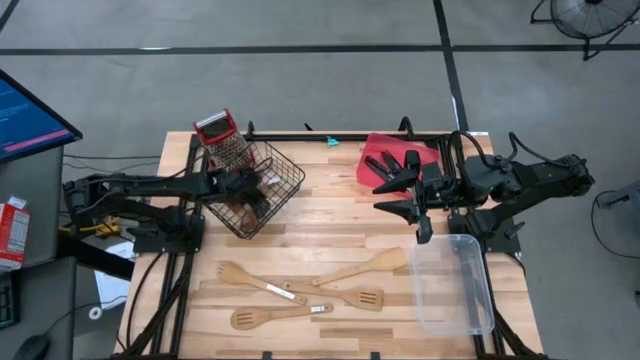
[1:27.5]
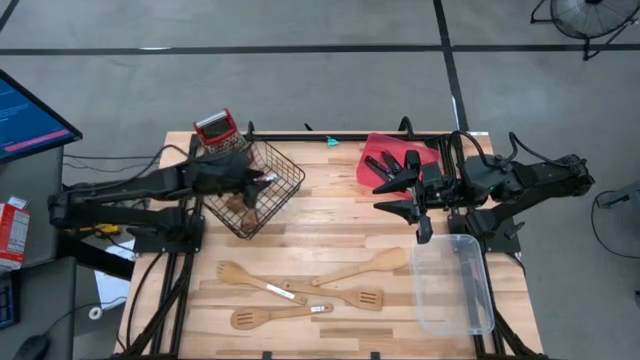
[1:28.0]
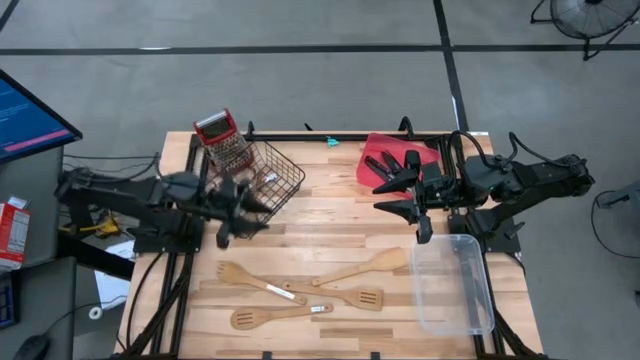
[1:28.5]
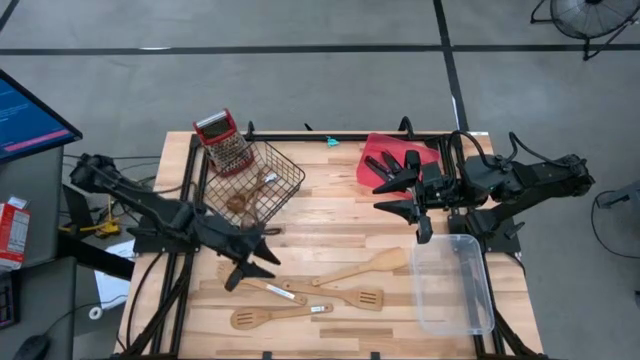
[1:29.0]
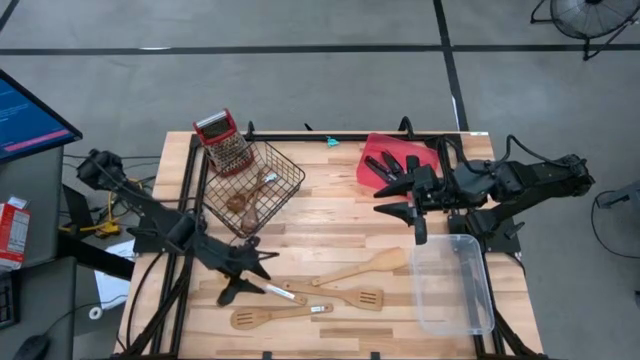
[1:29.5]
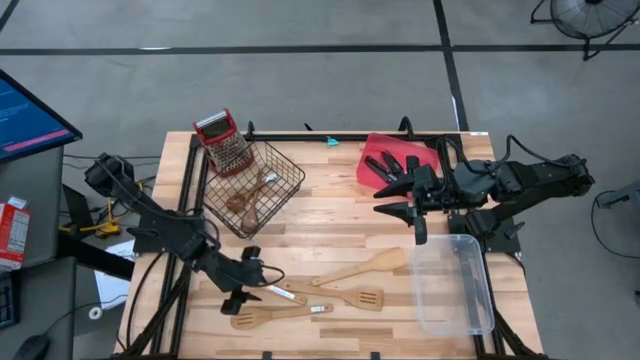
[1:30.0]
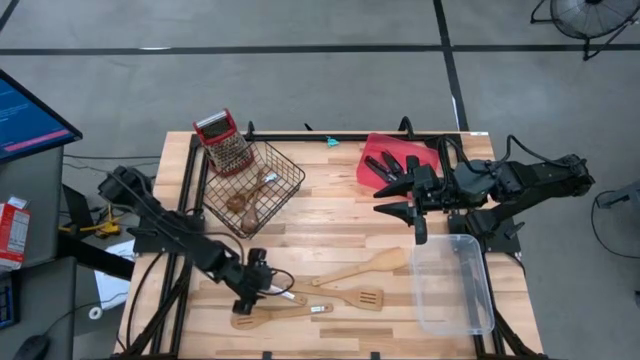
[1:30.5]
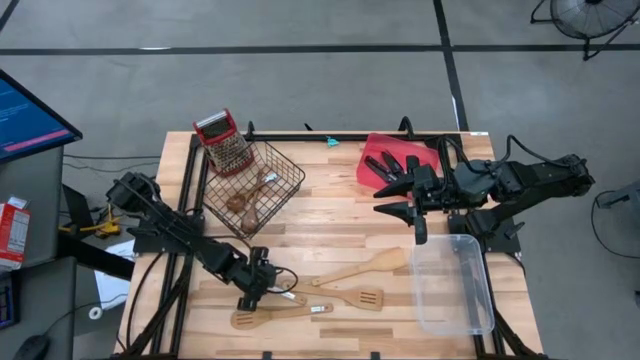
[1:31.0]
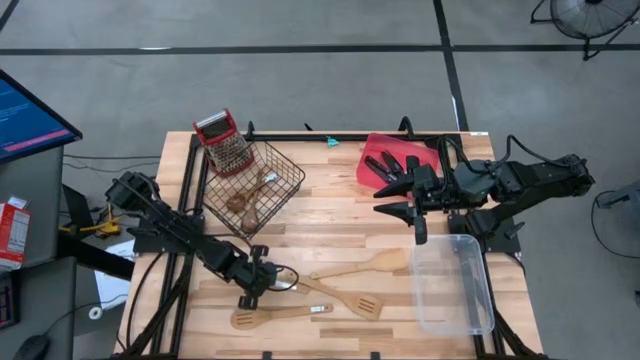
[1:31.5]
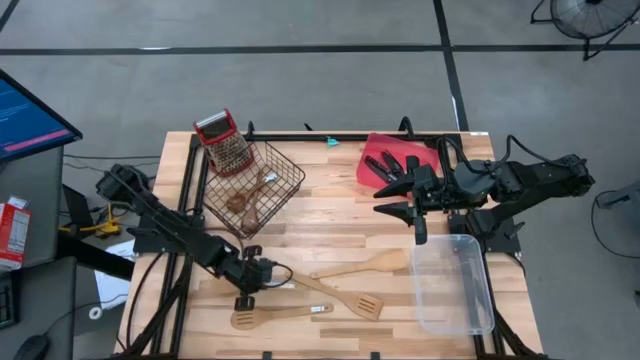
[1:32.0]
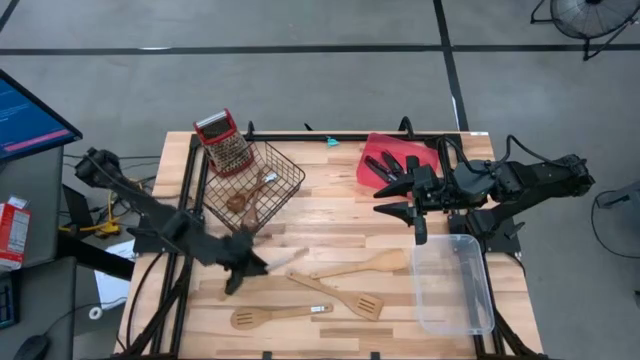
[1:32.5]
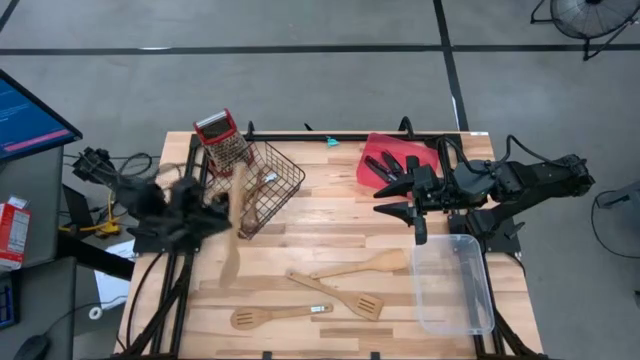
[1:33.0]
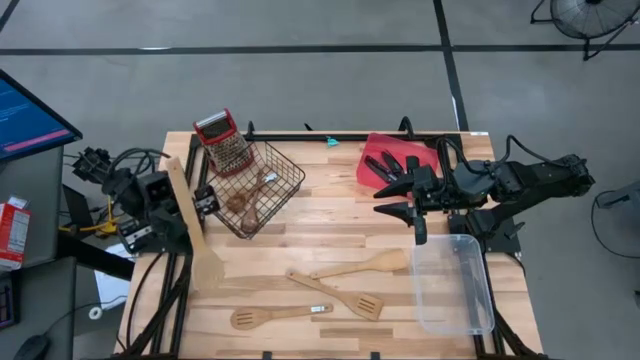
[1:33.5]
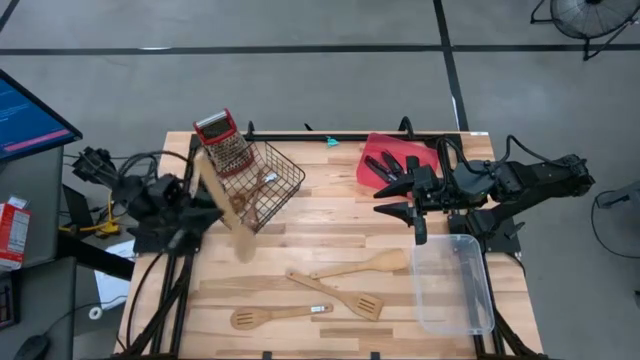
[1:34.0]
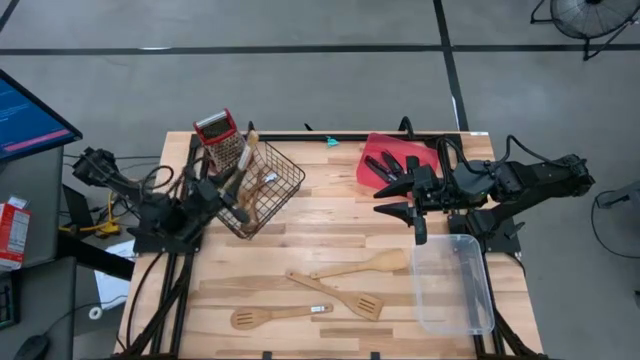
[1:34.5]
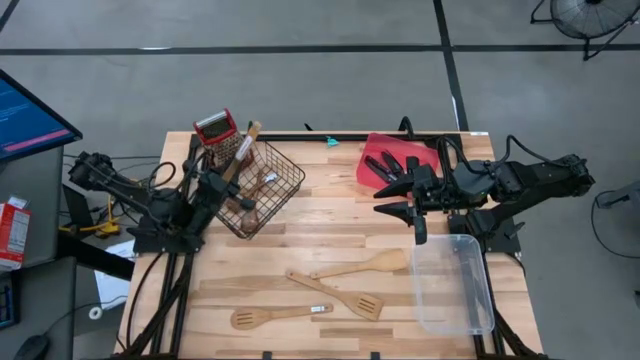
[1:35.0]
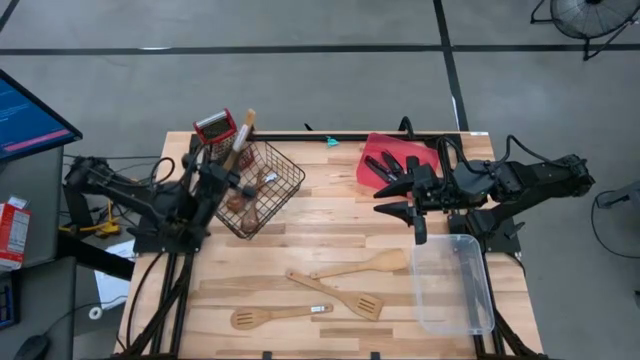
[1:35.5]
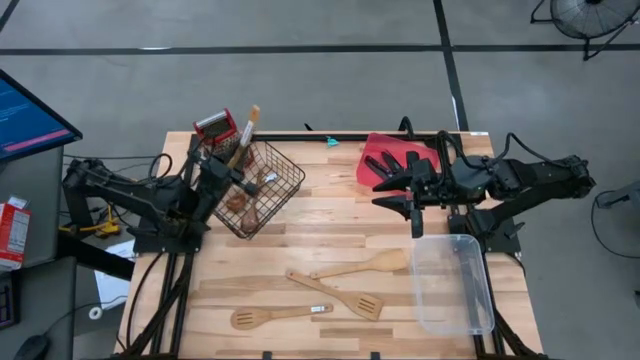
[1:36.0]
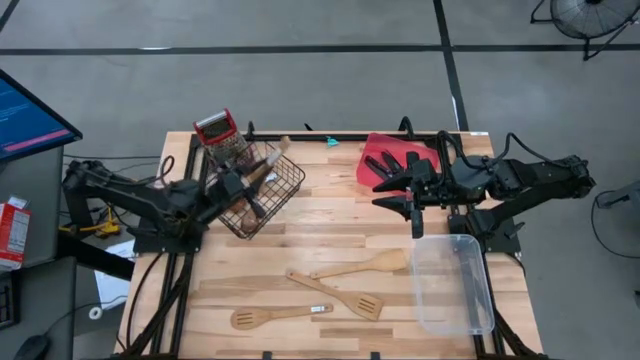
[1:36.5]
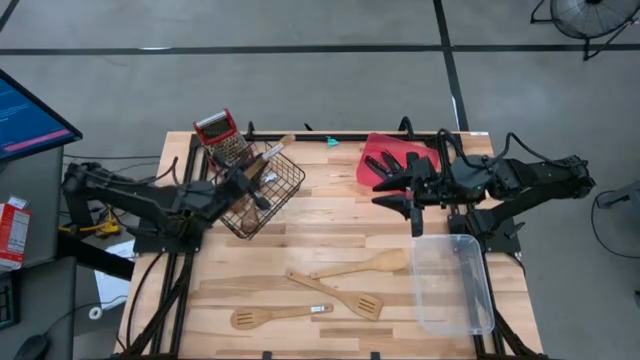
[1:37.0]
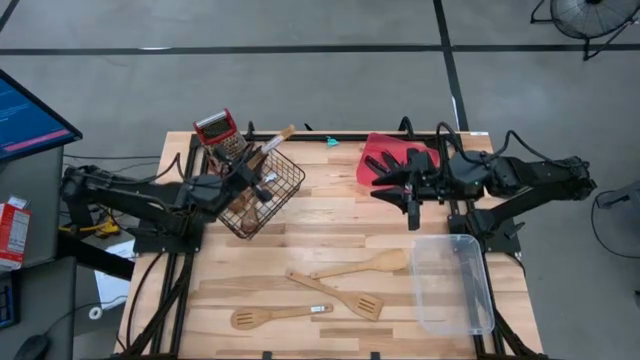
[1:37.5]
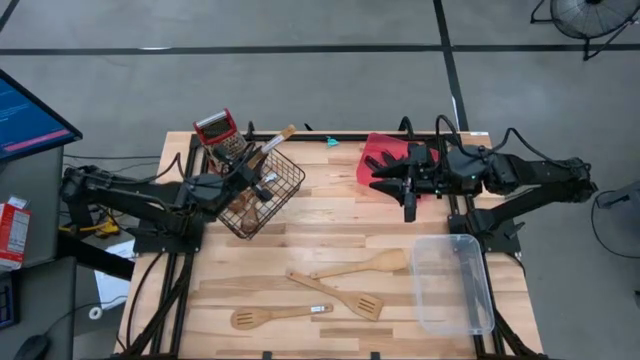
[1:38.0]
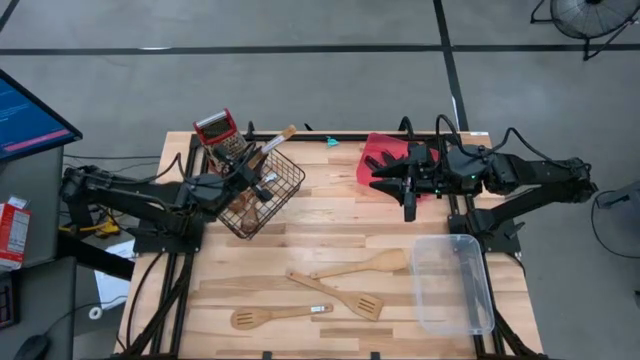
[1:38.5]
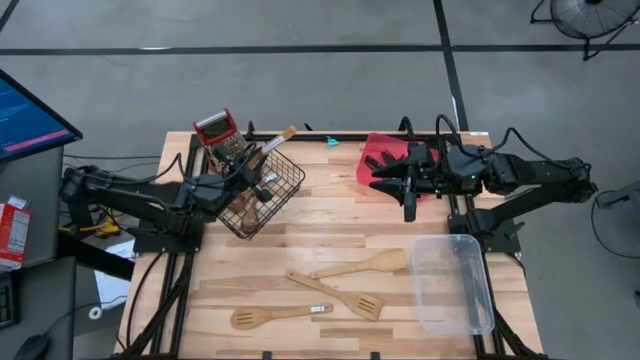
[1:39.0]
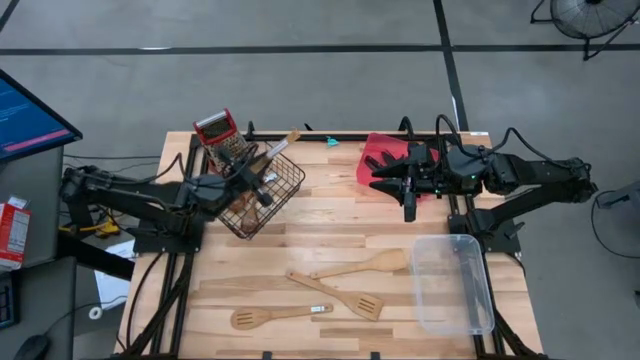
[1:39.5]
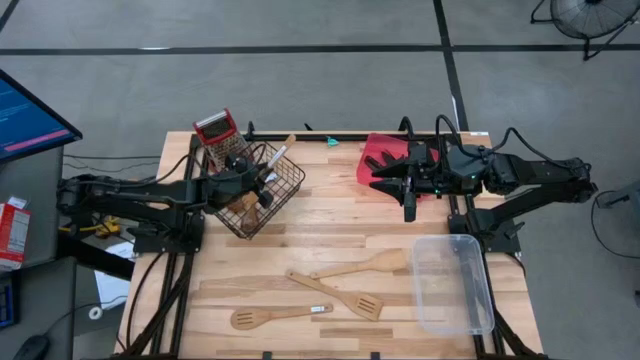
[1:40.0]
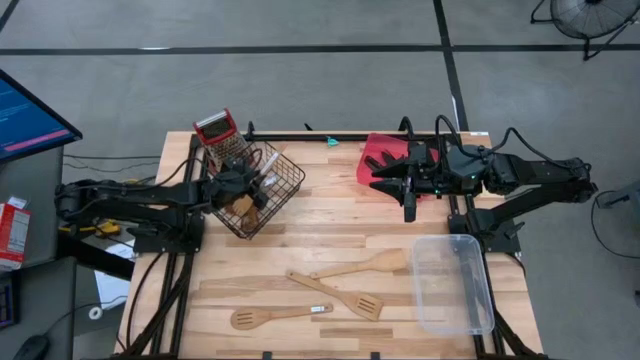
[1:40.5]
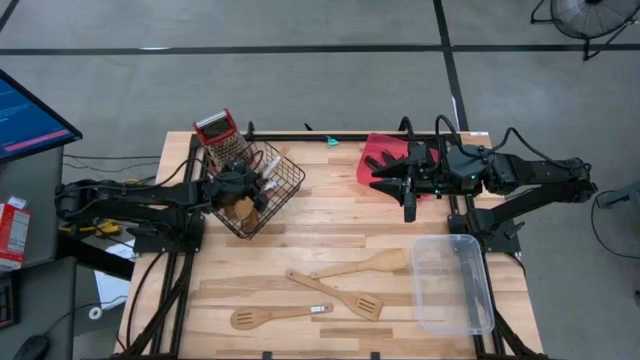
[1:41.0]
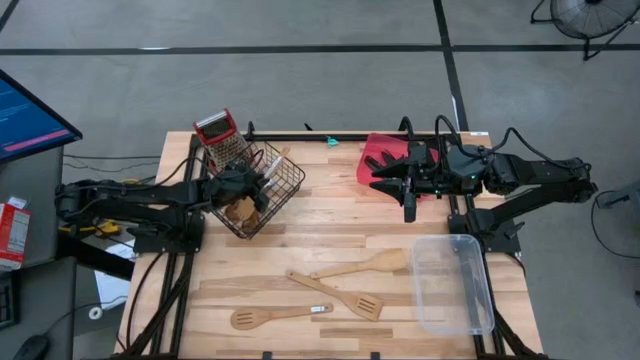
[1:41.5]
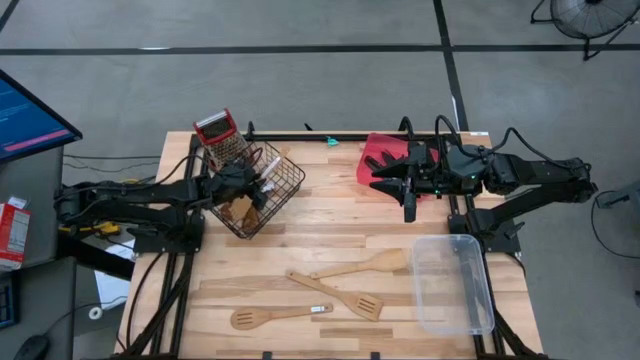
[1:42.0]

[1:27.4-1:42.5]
Task: Pick & Place Kitchen Items
Put the top brown serving spoon into the black wire basket

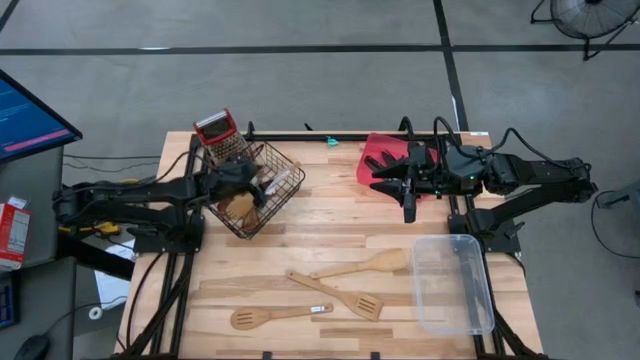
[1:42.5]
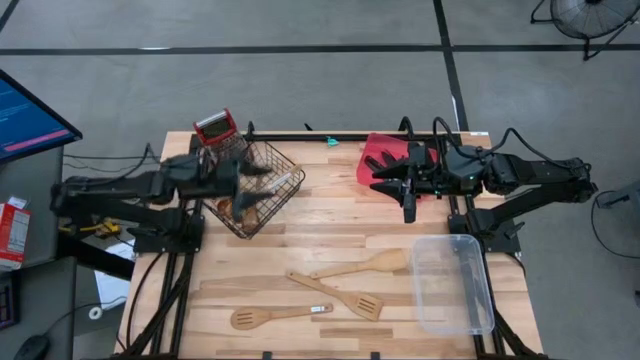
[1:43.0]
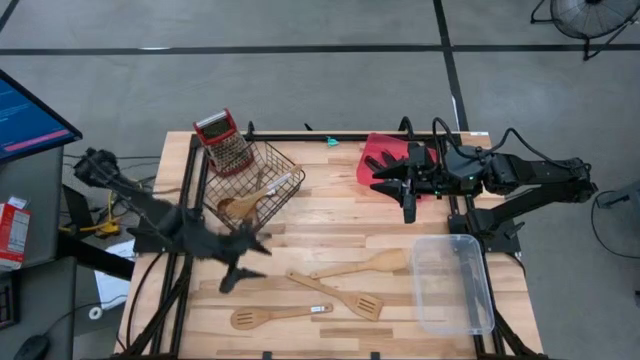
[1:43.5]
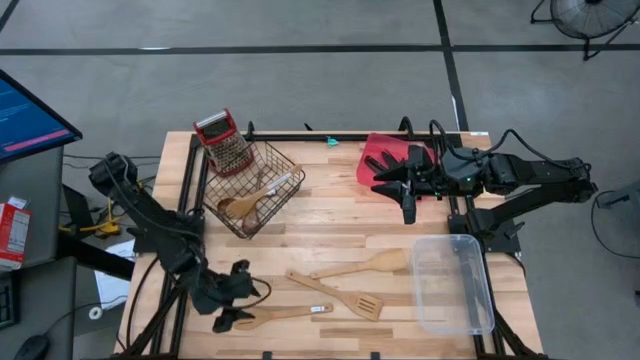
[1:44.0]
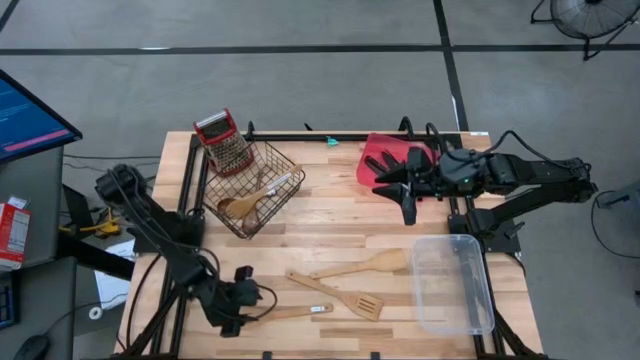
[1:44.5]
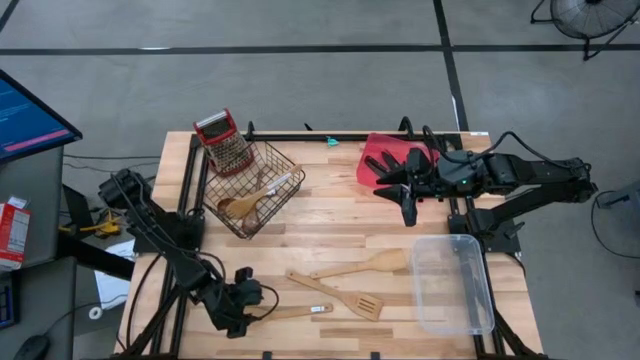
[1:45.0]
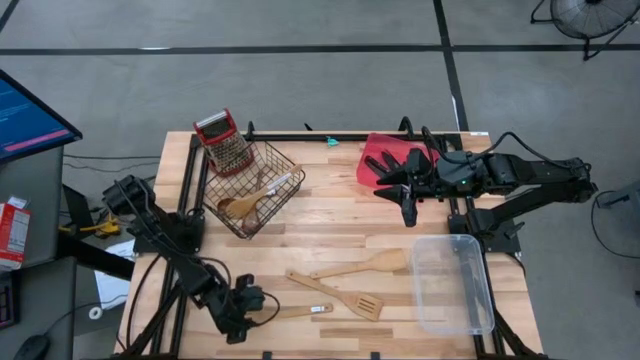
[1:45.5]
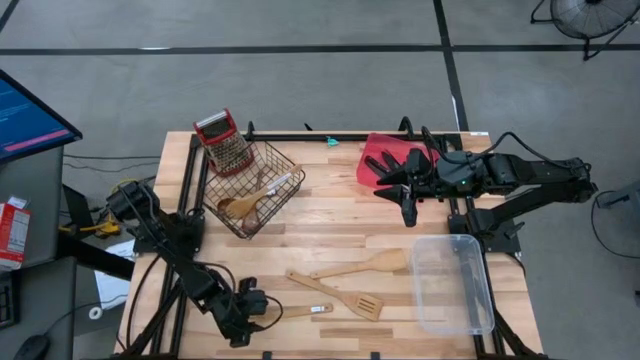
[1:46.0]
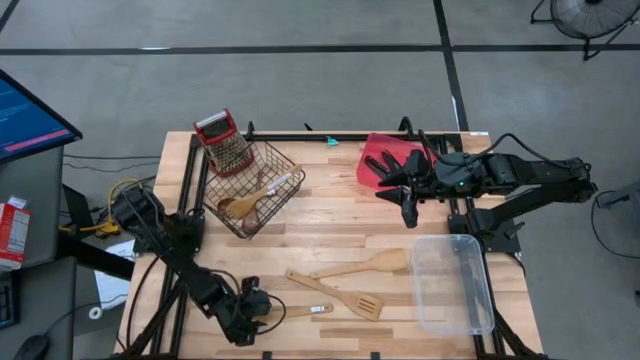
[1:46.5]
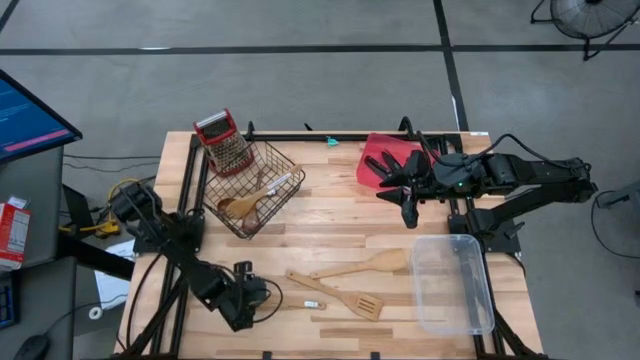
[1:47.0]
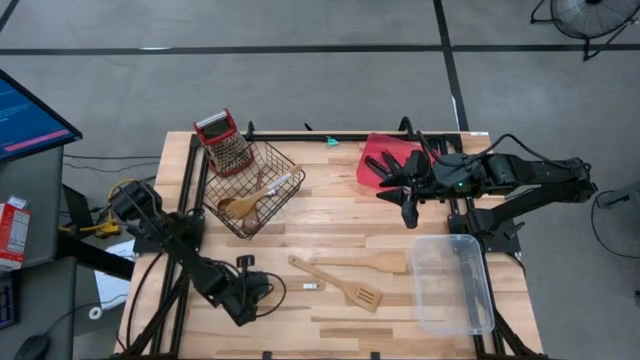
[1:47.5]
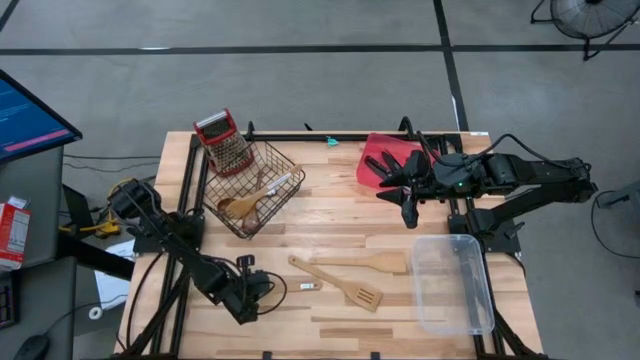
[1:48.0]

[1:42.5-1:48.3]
Put the brown serving spoon into the black wire basket
